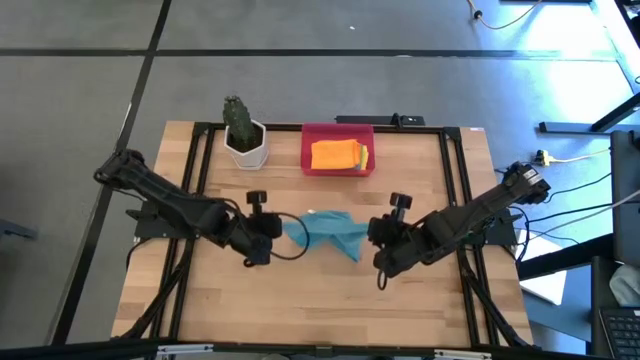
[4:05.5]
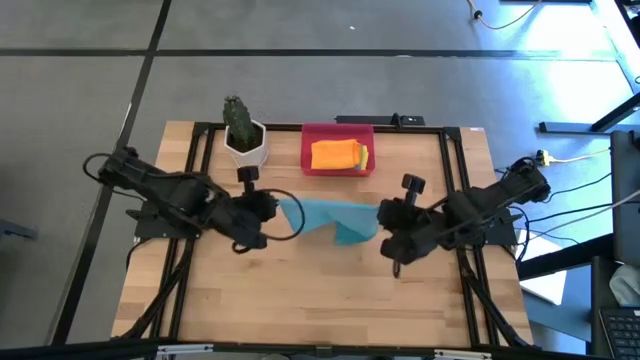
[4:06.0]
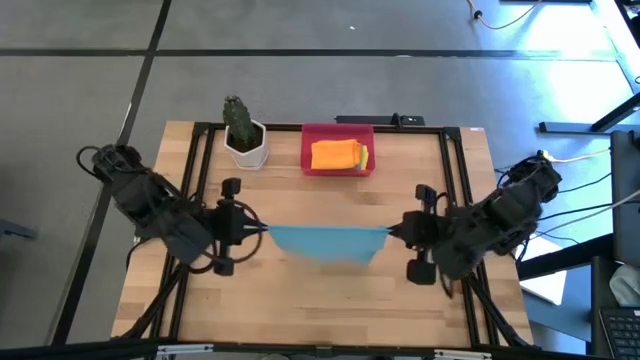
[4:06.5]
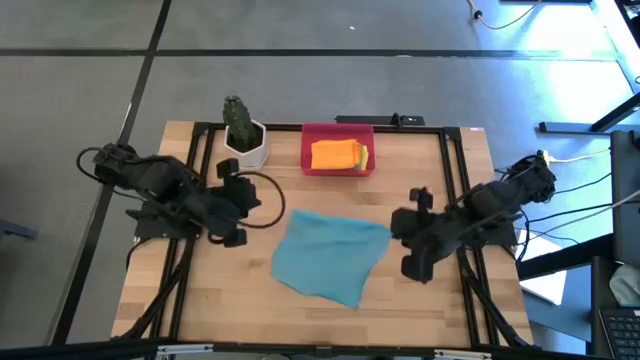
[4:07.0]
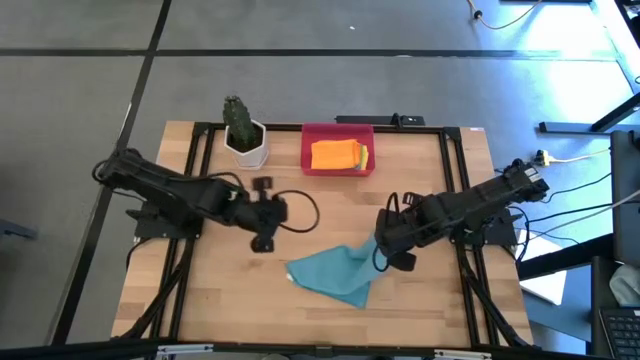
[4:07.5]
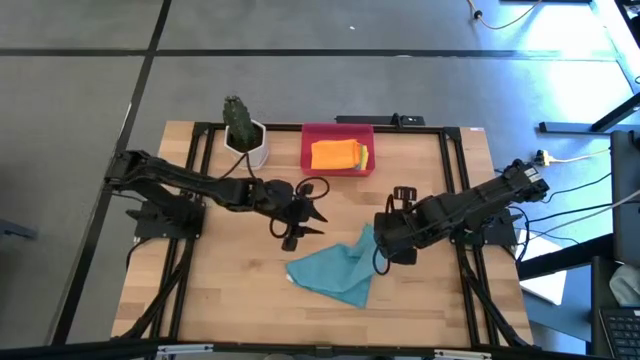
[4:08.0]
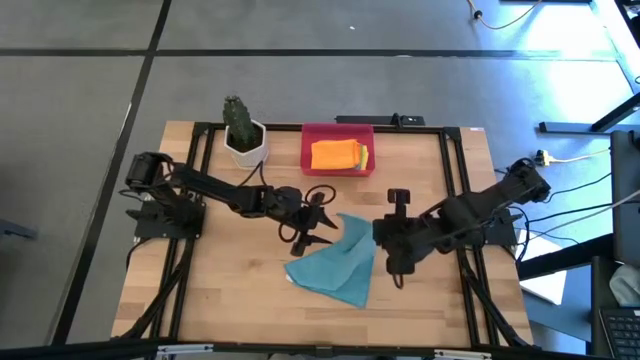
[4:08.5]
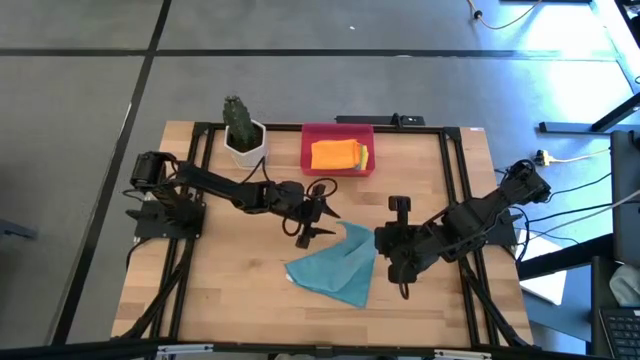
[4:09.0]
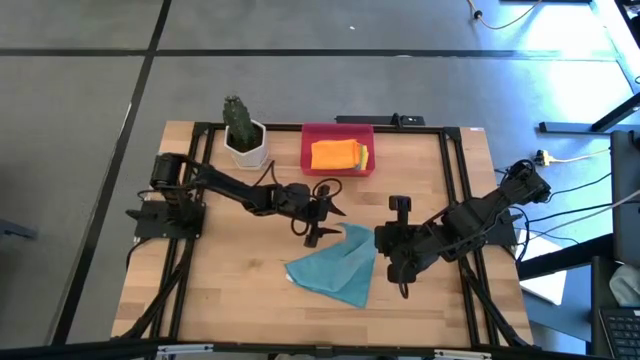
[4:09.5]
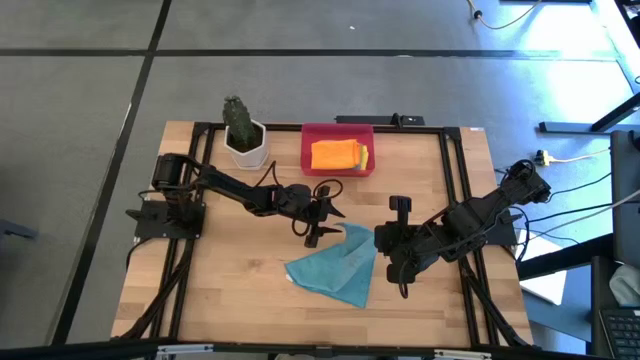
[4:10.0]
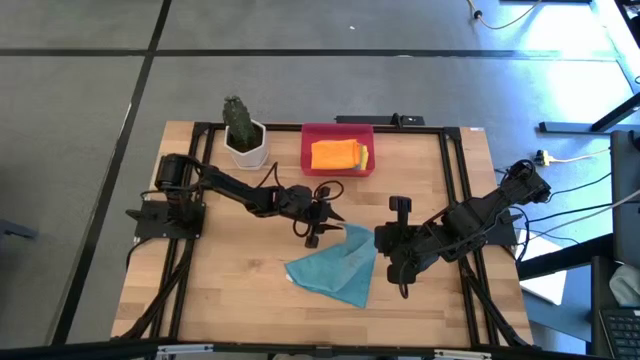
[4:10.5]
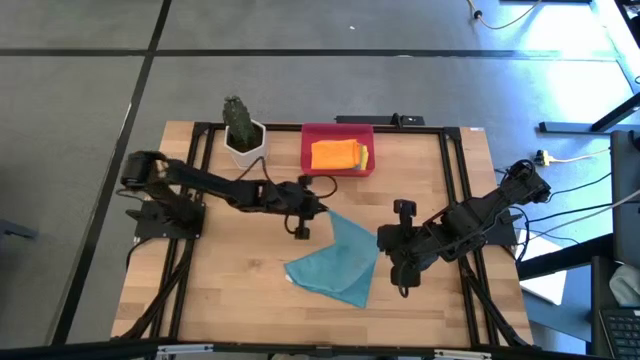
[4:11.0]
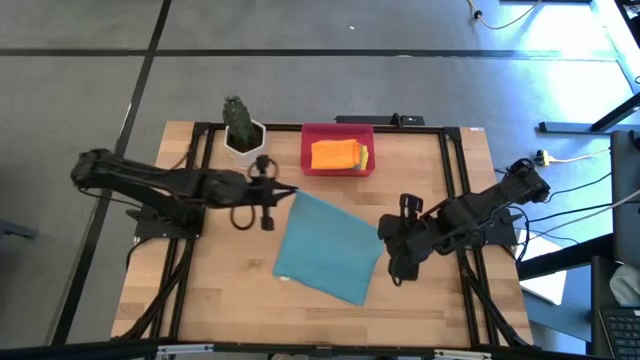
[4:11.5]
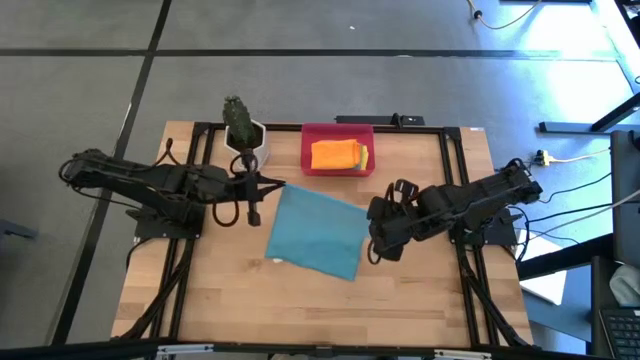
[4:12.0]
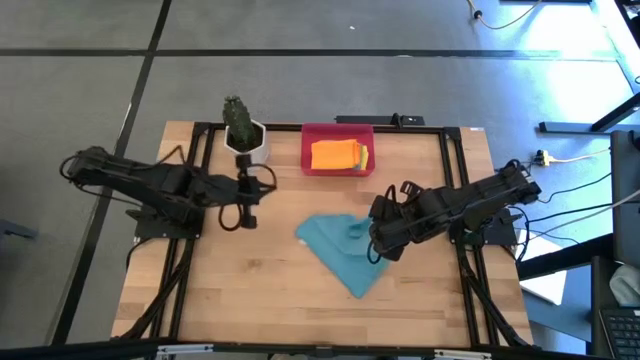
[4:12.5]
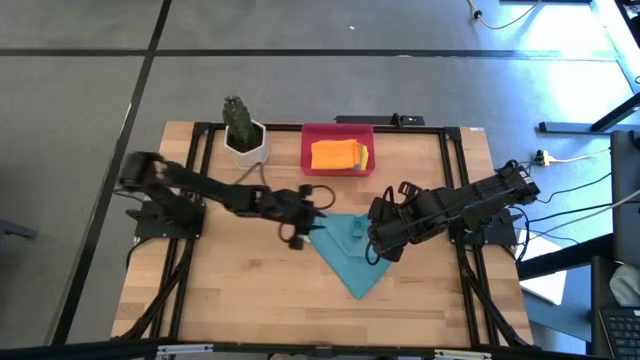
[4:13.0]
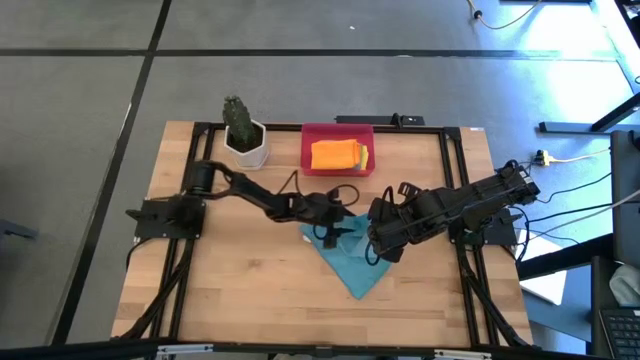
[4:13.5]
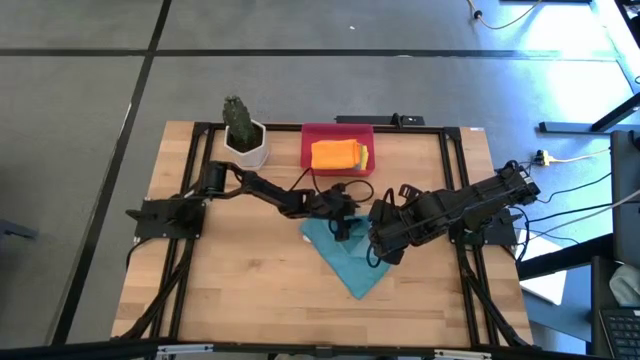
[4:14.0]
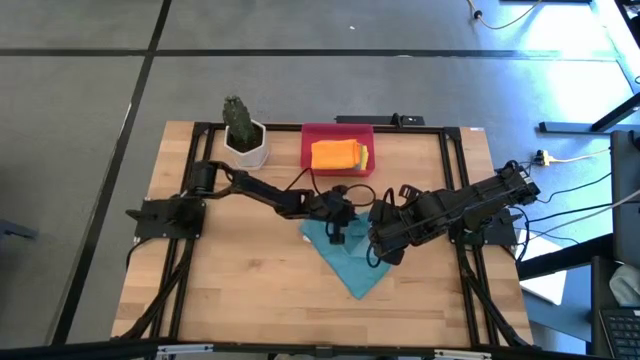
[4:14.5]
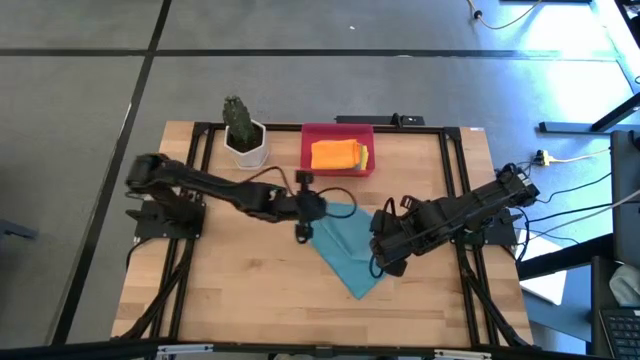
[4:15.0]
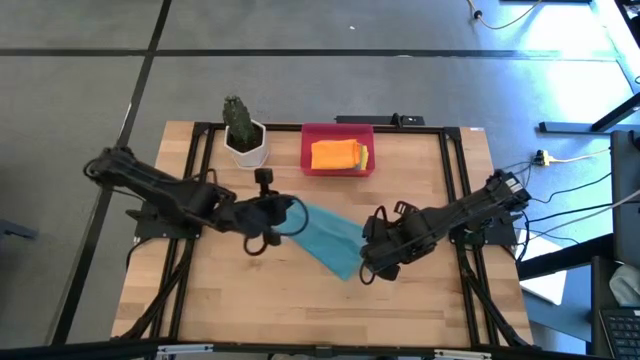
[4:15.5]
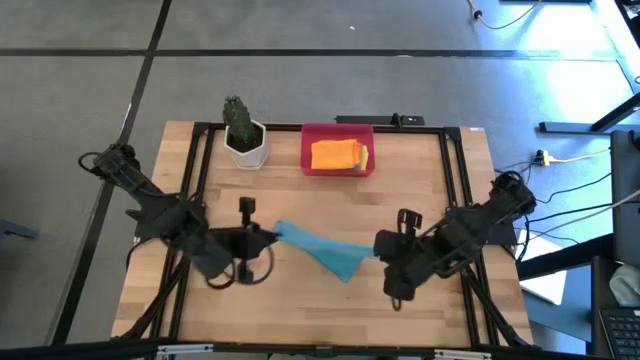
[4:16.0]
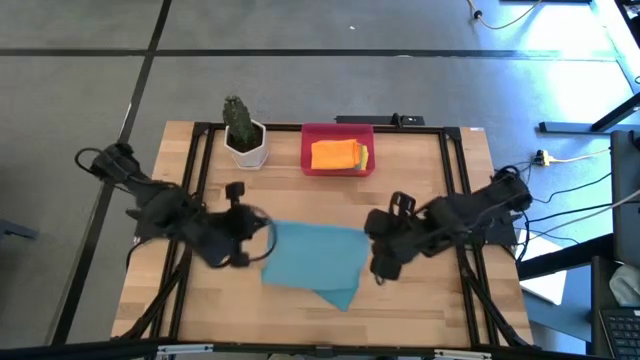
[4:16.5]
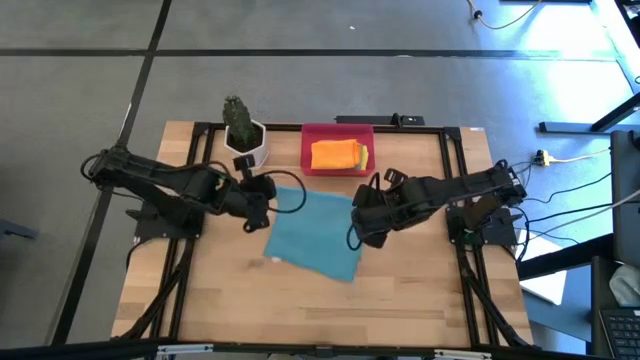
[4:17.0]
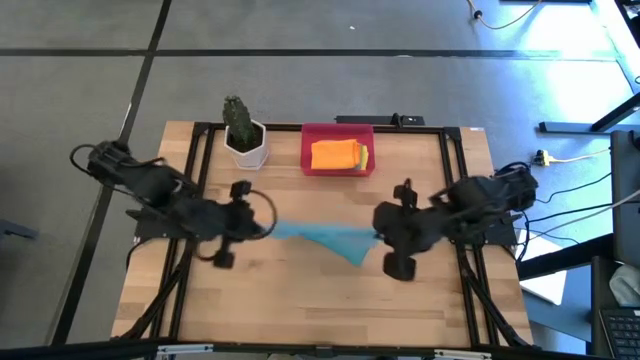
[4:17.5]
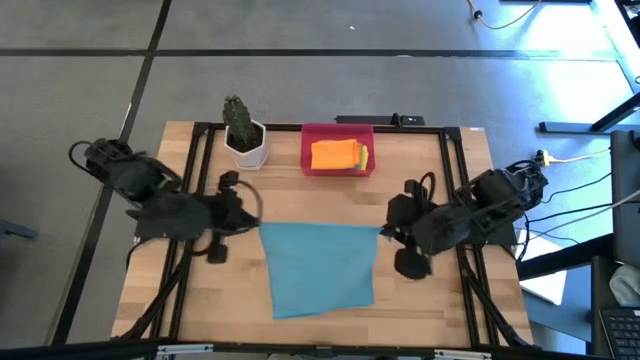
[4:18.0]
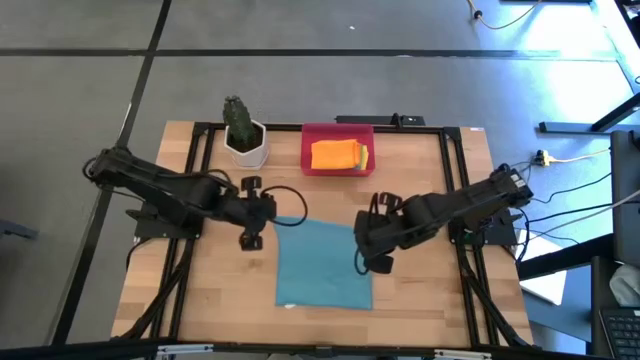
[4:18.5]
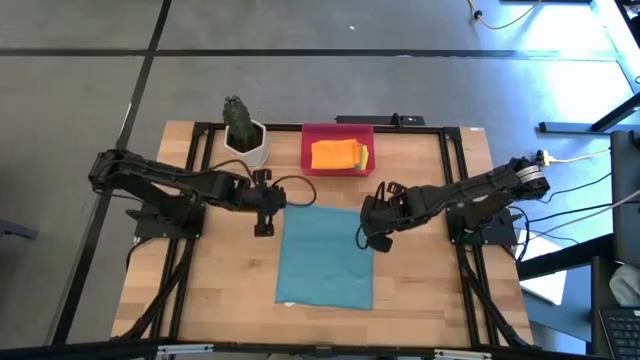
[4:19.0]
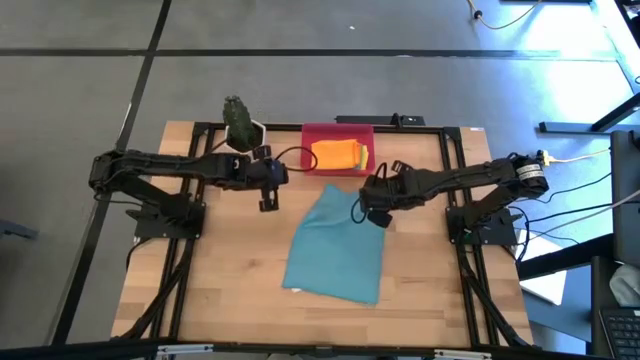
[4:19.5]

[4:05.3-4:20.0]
Task: Fold microfiber towels
Fold the blue microfiber cloth

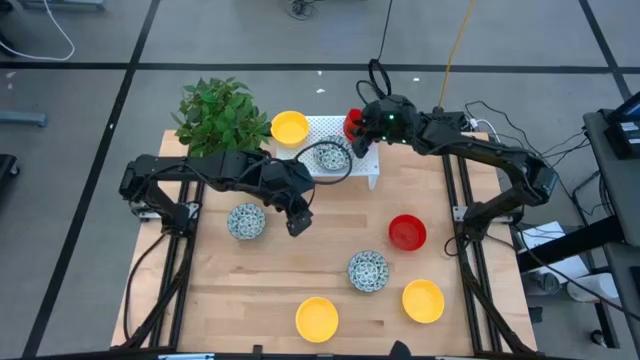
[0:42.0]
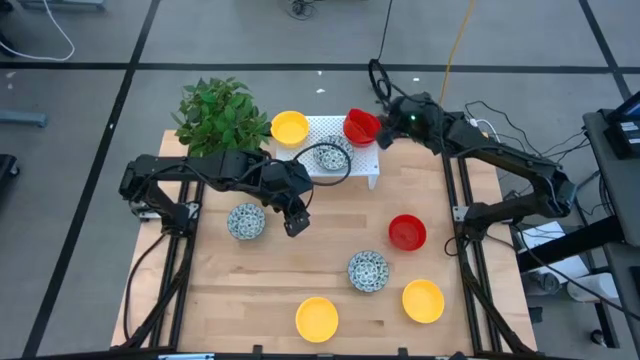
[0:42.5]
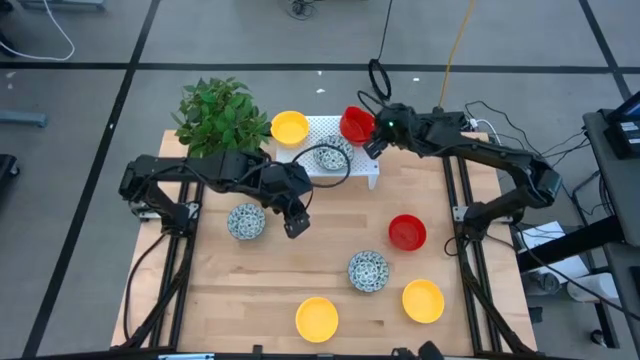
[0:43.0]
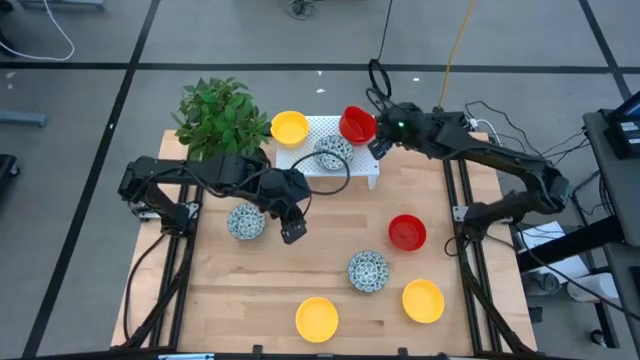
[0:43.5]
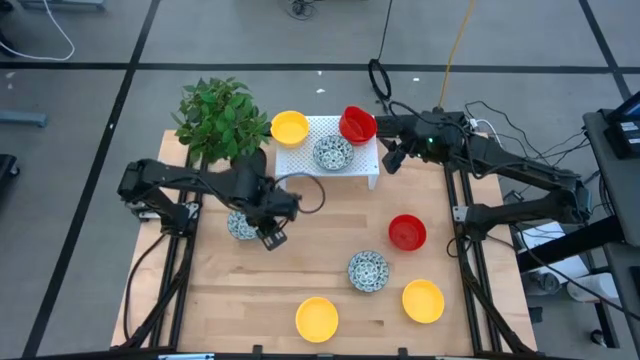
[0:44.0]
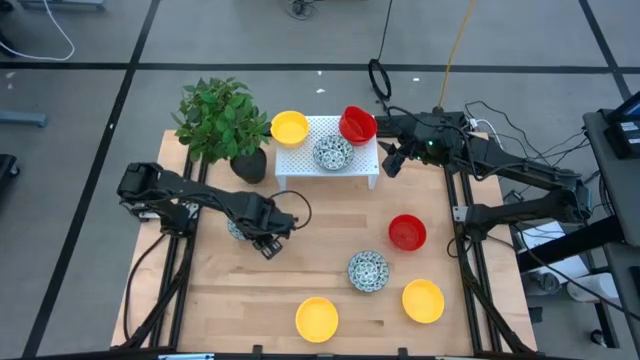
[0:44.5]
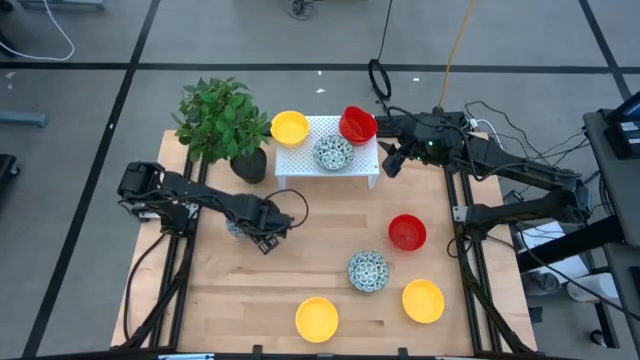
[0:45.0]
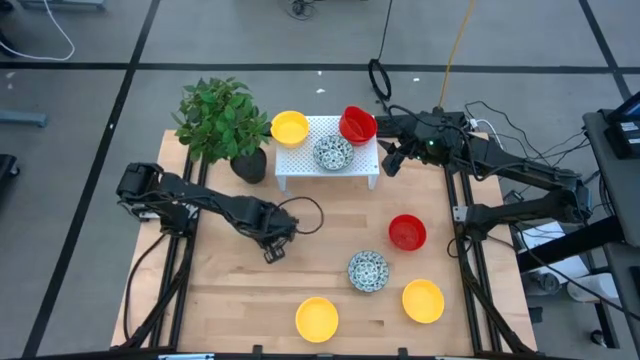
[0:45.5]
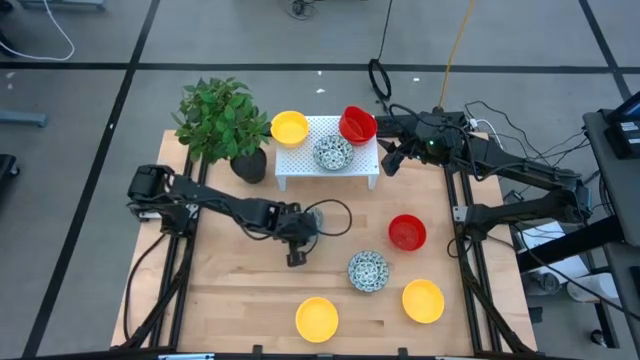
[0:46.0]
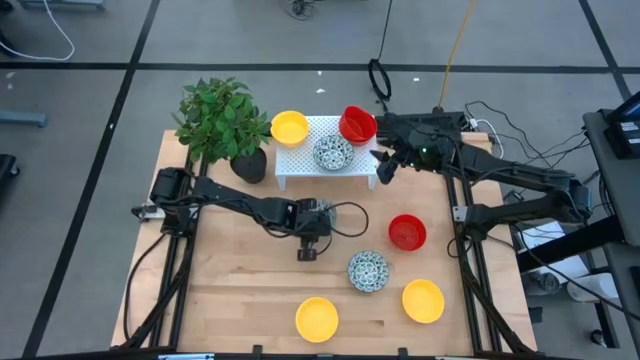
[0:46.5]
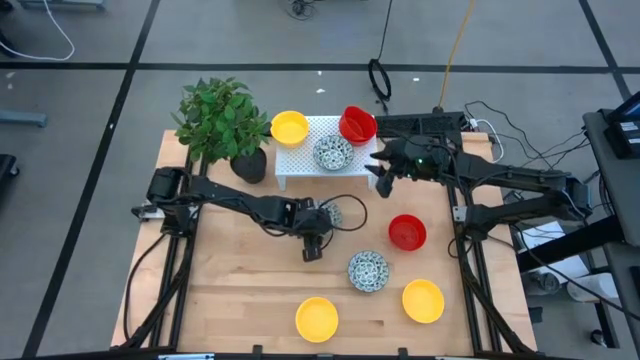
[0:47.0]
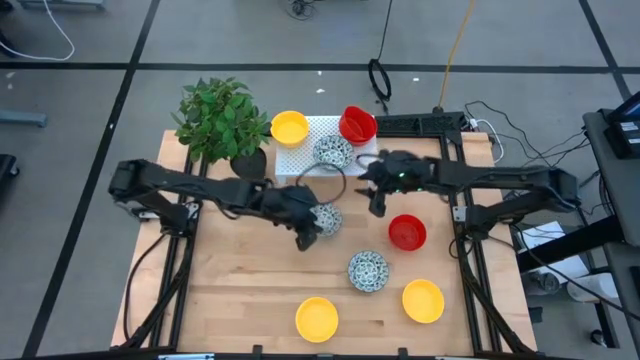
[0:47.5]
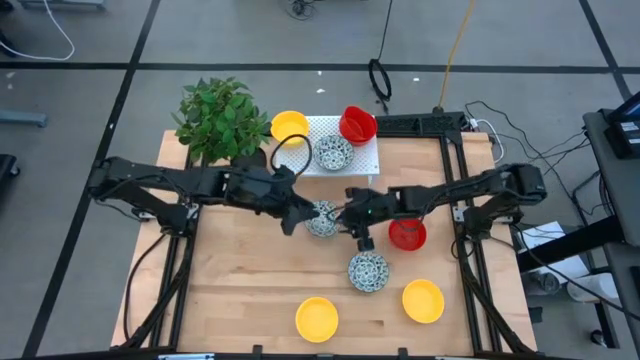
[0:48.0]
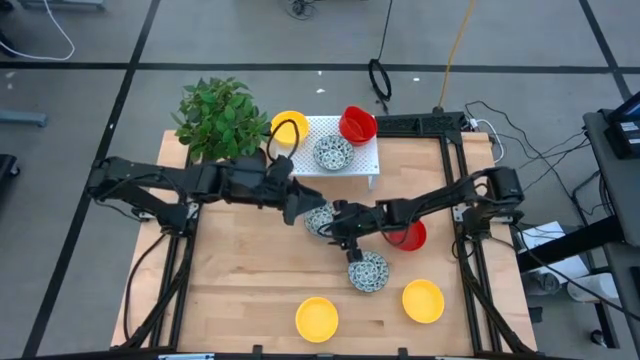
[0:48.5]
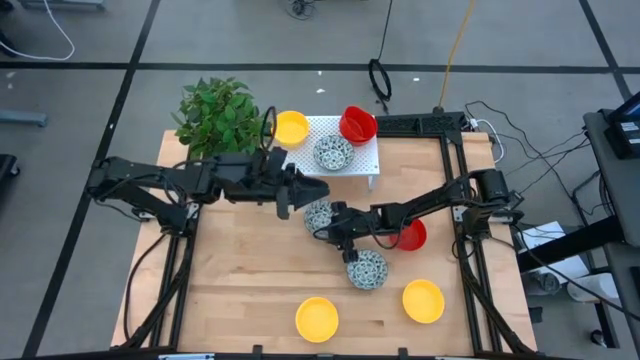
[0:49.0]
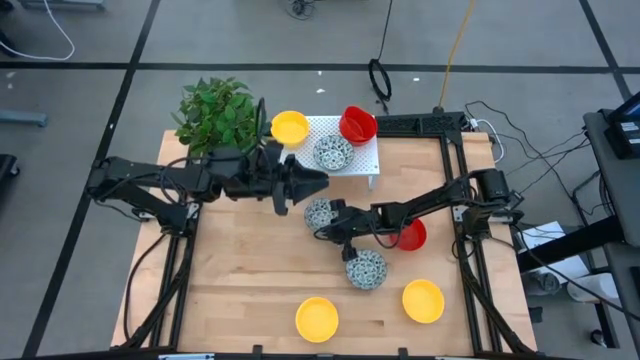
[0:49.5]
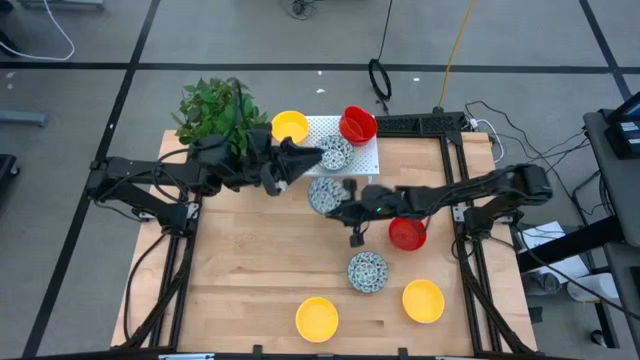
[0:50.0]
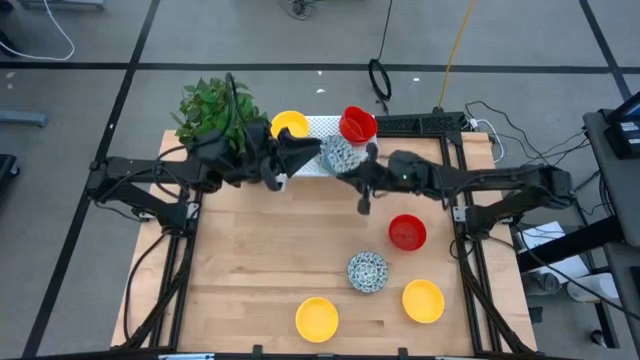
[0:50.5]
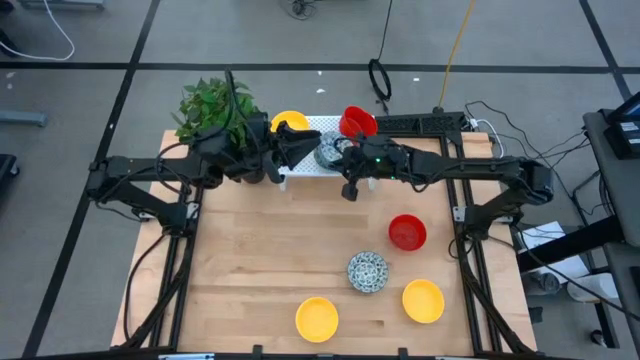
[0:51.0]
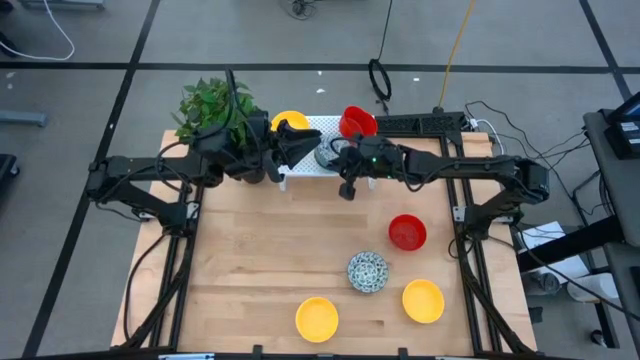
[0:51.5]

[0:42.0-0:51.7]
Task: Pick & Place Mini bowls
Stack the left blue patterned bowl on the blue patterned bowl on the shelf
